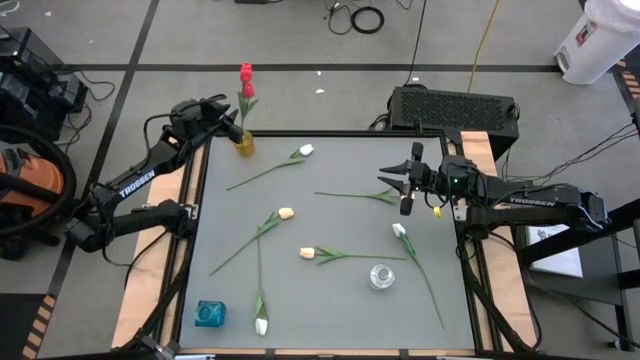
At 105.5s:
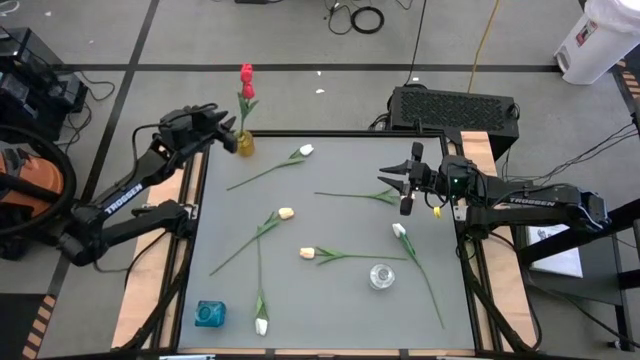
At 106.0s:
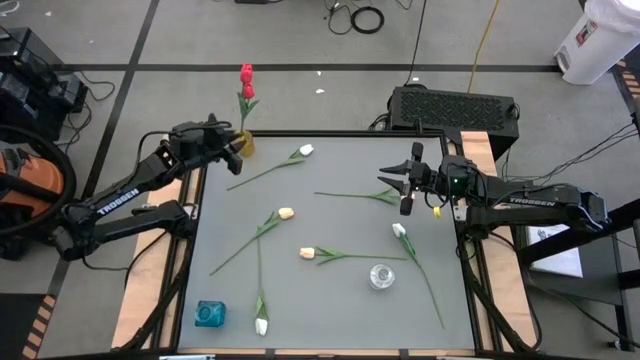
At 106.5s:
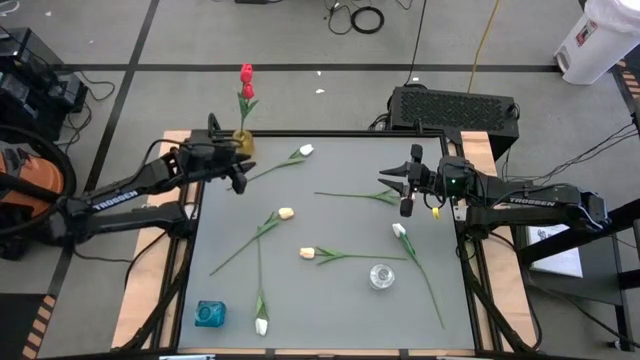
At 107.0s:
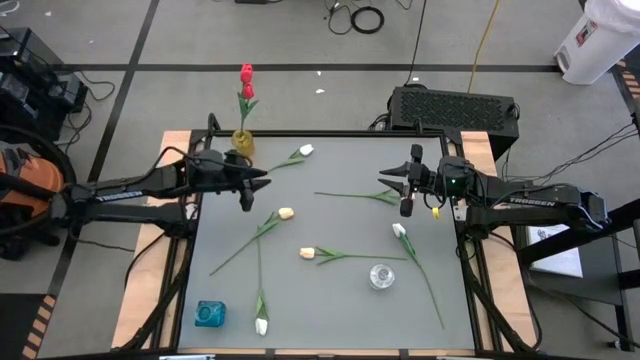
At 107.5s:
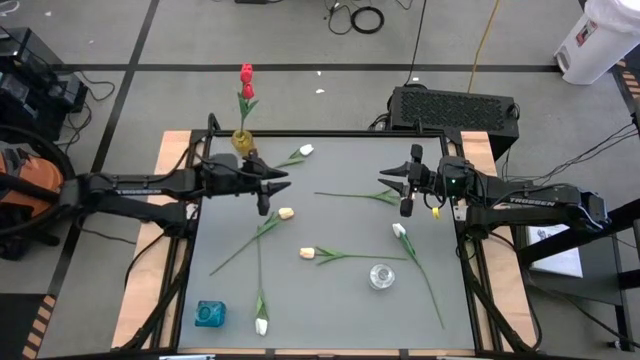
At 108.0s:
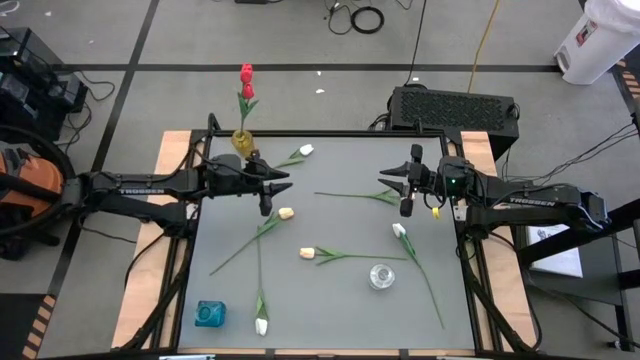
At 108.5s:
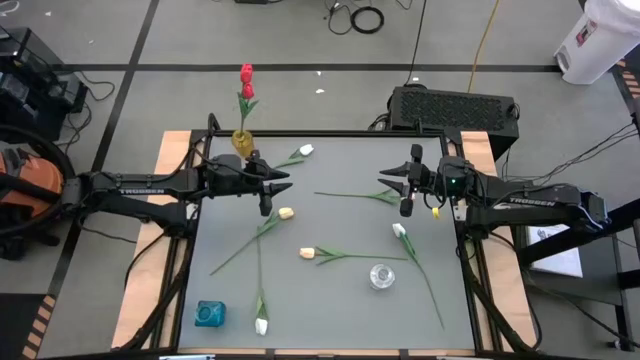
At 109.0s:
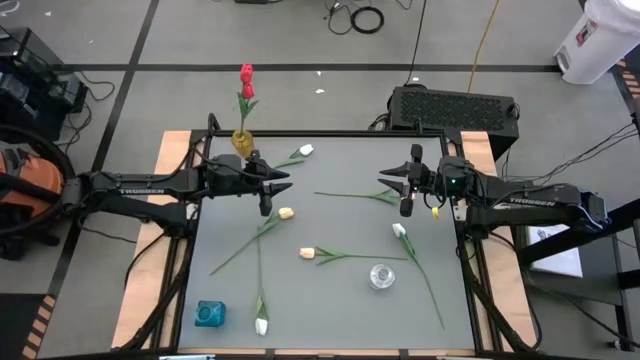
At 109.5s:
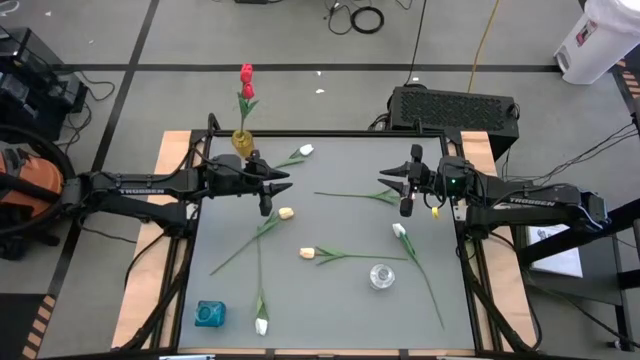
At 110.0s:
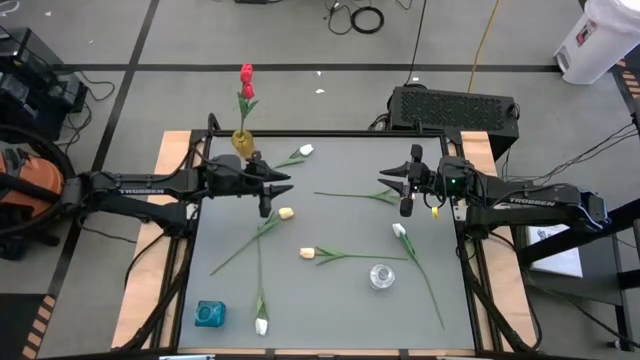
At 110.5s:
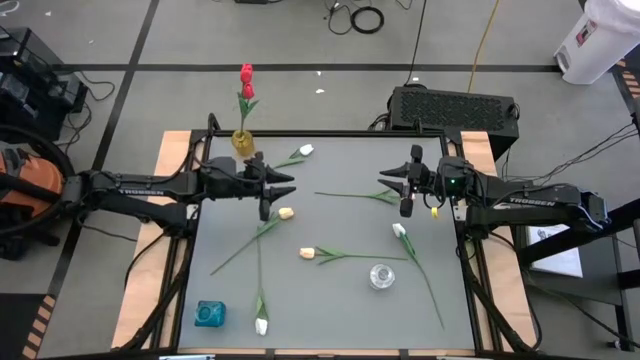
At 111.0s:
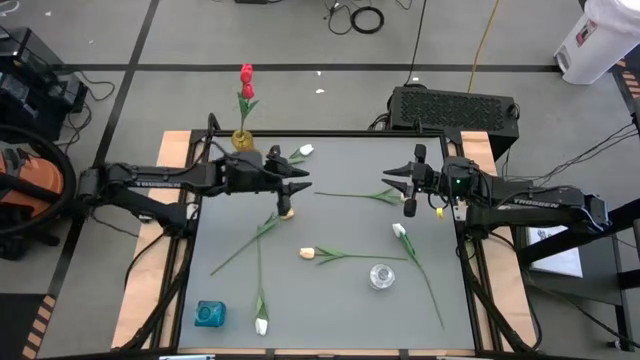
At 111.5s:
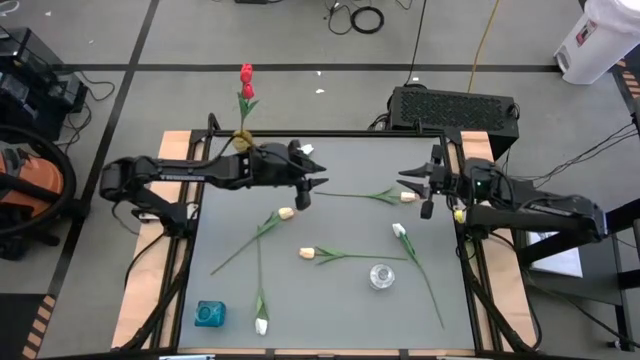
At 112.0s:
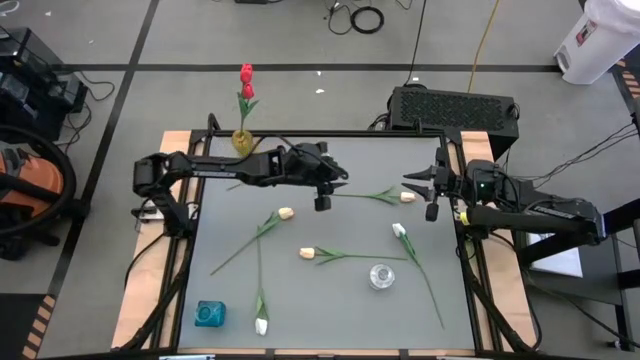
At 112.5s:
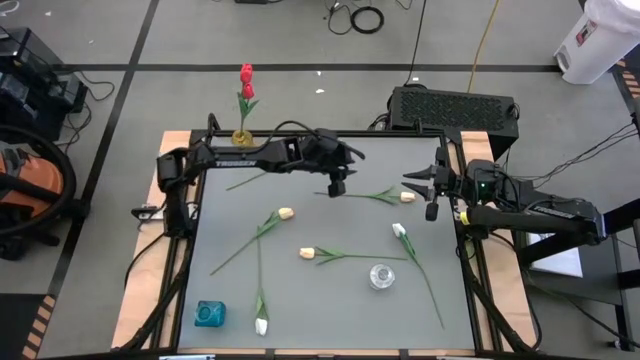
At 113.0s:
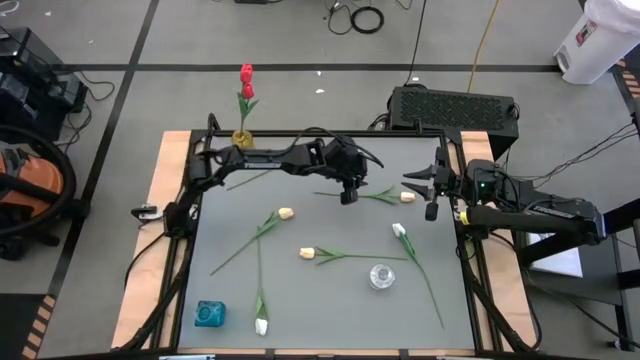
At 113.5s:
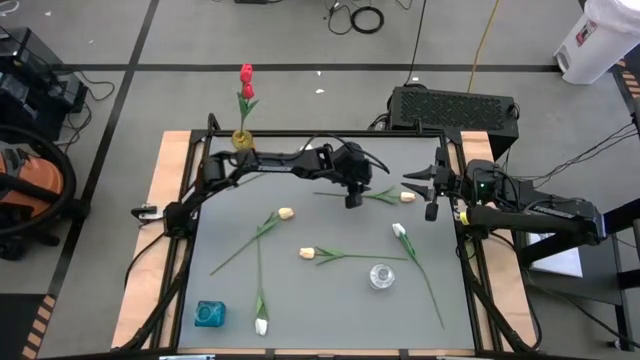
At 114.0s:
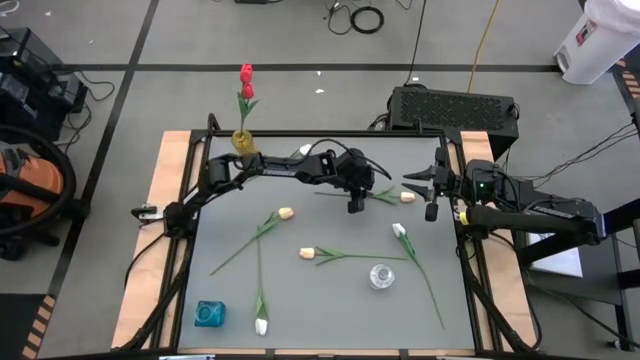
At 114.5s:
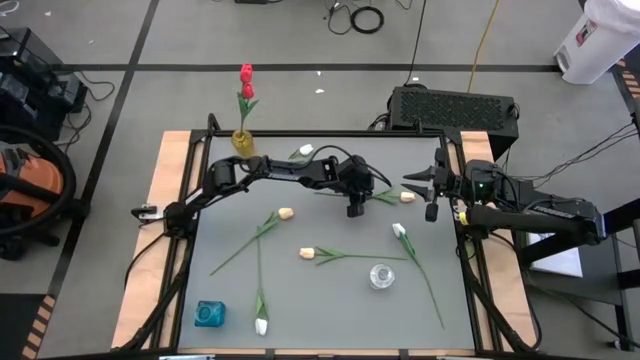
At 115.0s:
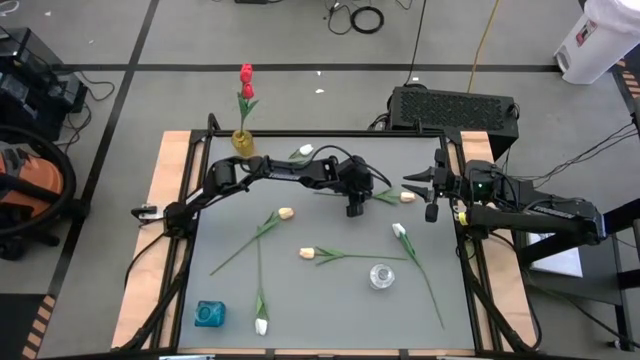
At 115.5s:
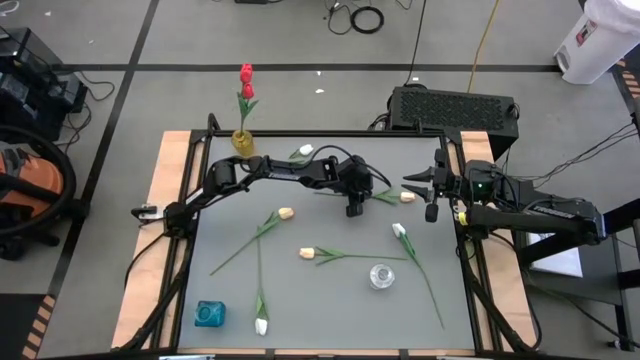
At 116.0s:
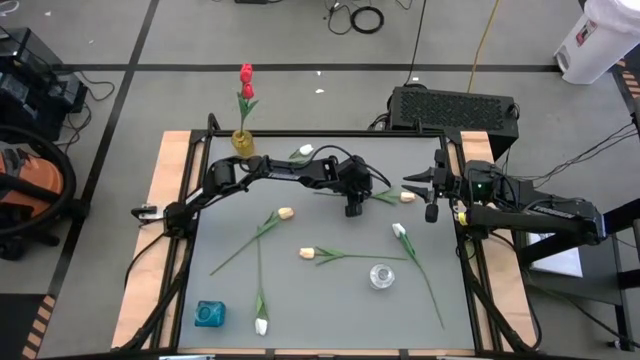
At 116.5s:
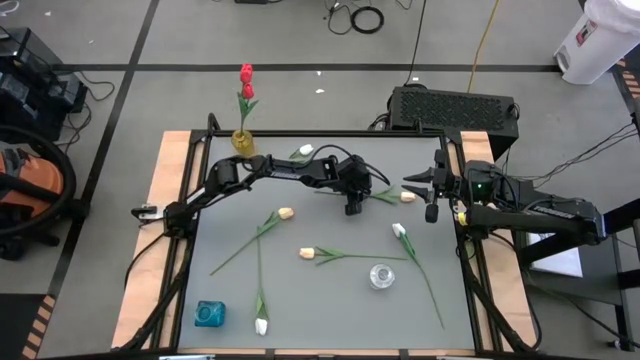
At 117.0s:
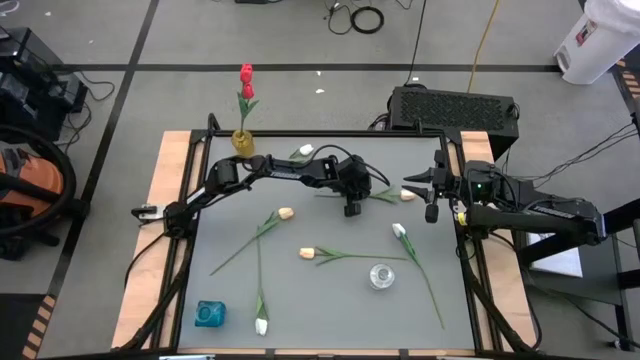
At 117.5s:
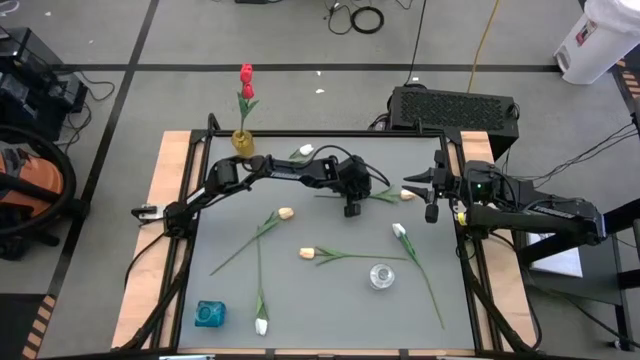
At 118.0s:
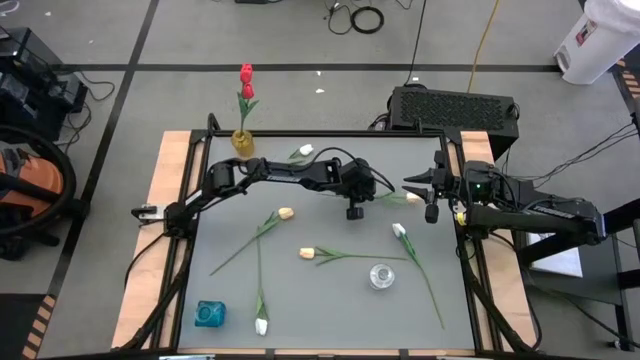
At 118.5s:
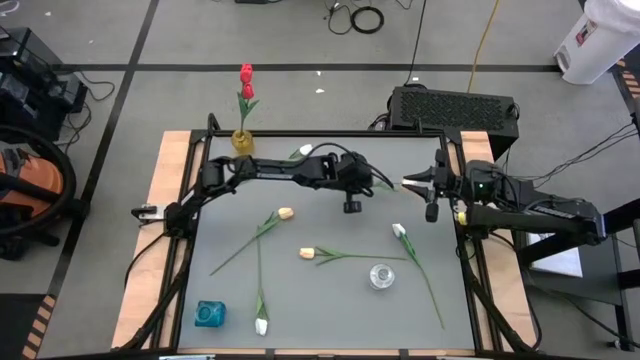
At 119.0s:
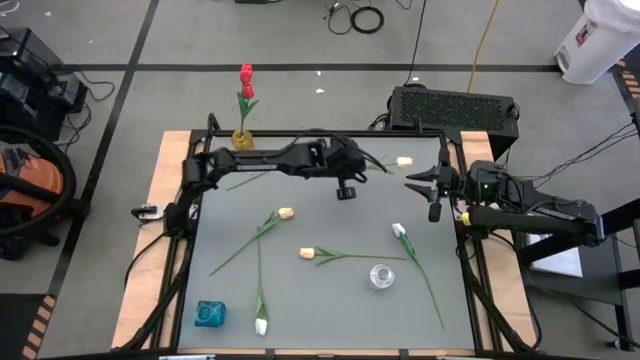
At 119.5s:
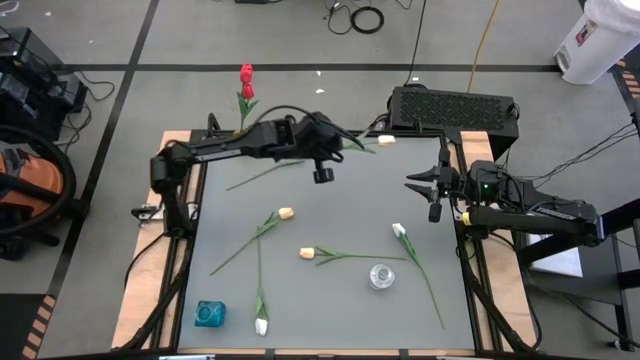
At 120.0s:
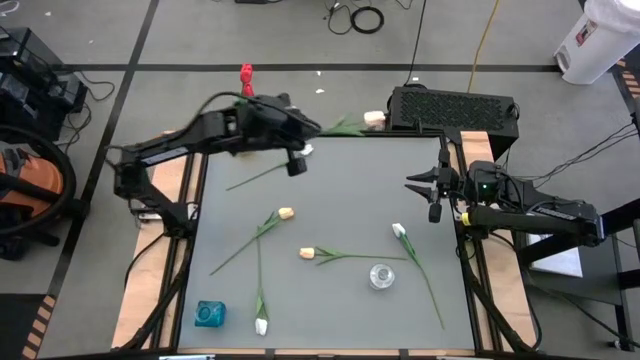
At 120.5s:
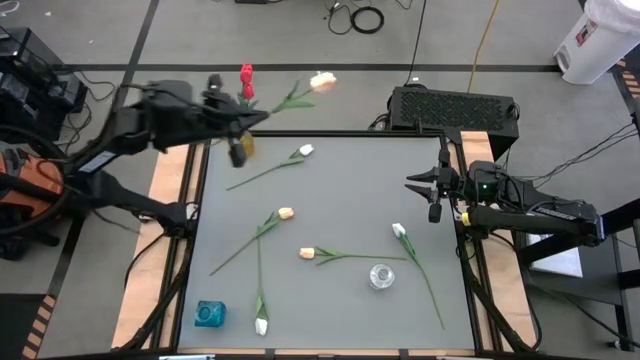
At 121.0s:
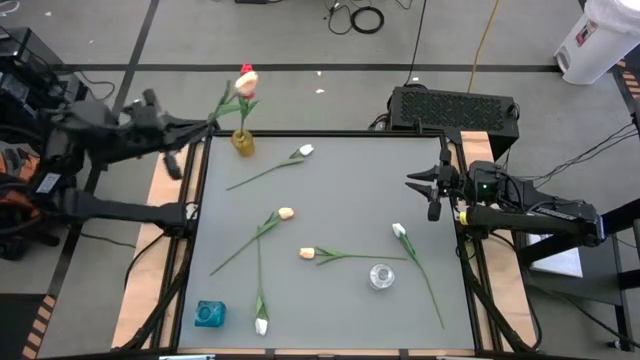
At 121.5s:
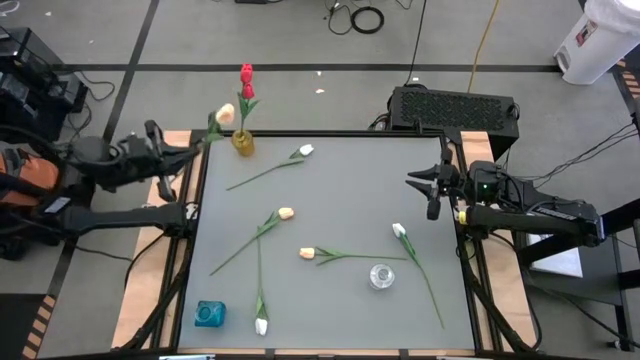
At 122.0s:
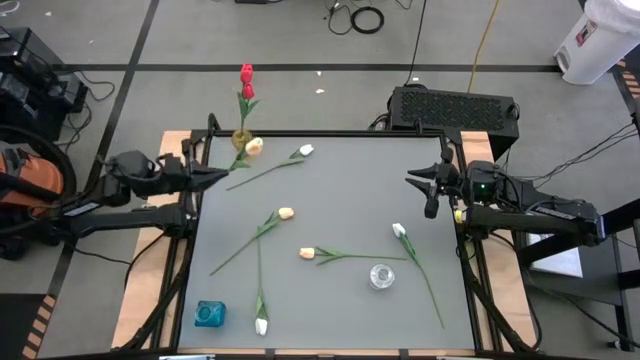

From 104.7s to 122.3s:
Task: Sort flowers into vase by color
Put the top yellow tulip into the blue vase
